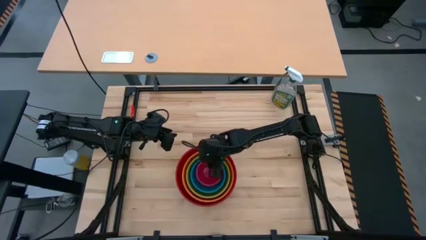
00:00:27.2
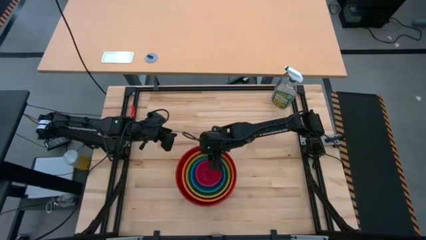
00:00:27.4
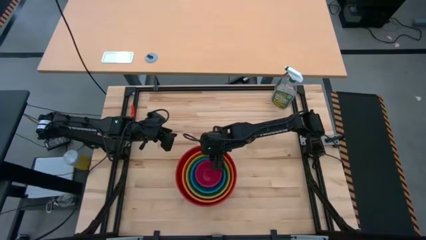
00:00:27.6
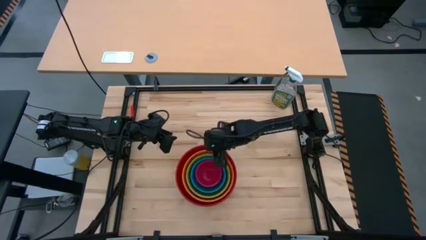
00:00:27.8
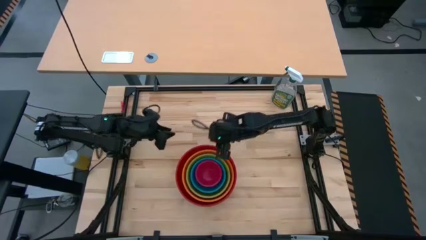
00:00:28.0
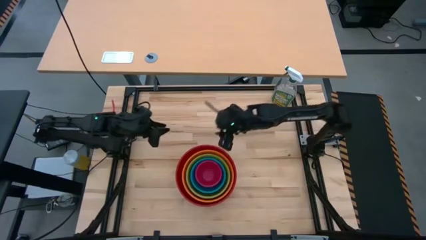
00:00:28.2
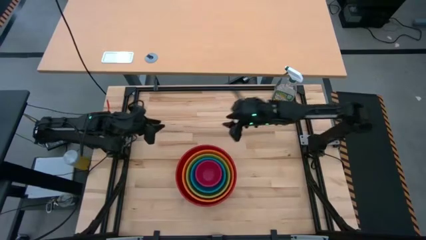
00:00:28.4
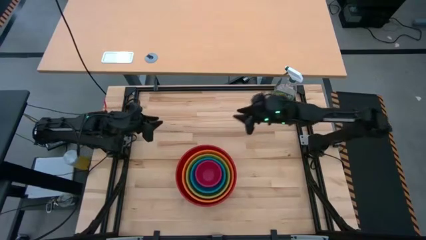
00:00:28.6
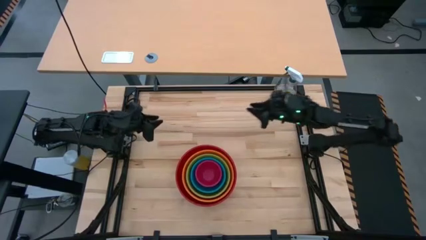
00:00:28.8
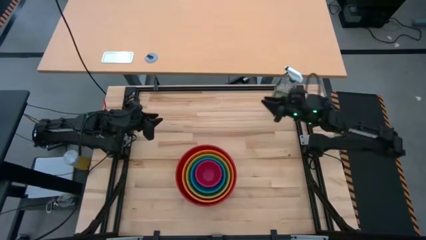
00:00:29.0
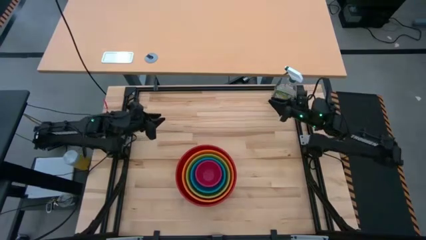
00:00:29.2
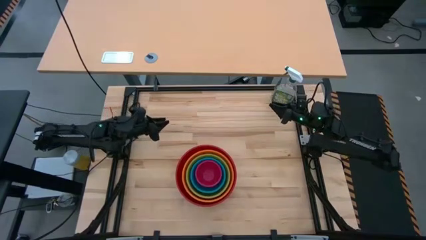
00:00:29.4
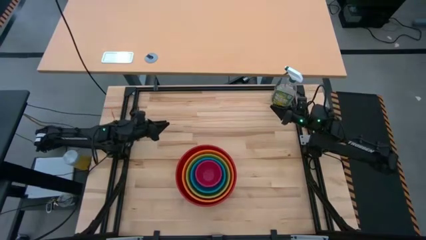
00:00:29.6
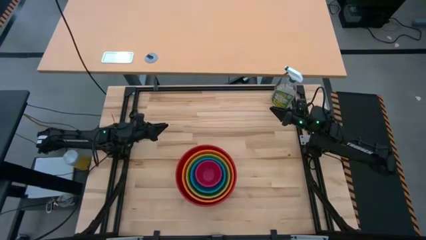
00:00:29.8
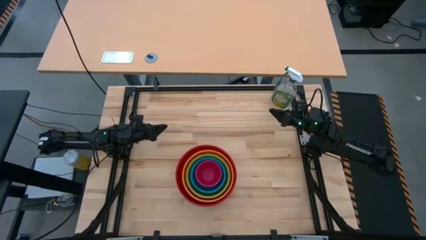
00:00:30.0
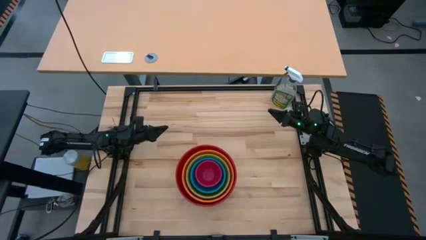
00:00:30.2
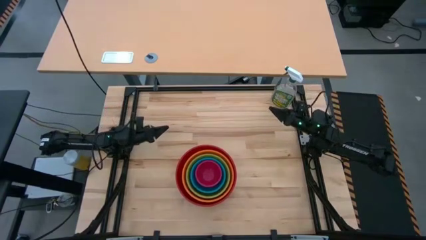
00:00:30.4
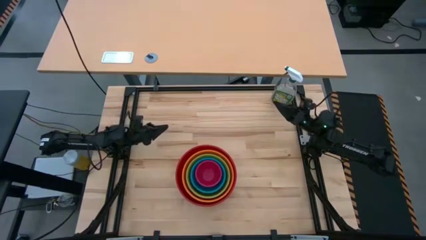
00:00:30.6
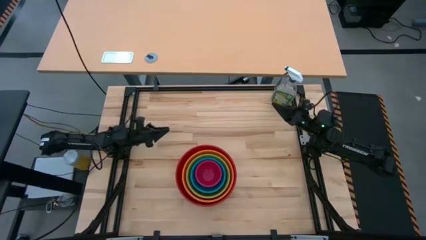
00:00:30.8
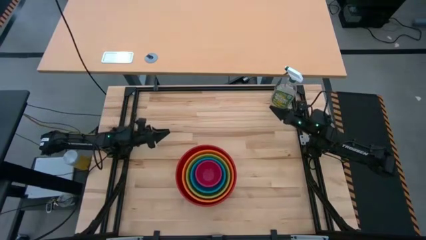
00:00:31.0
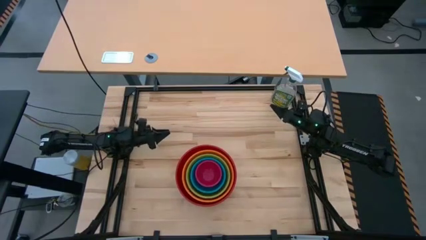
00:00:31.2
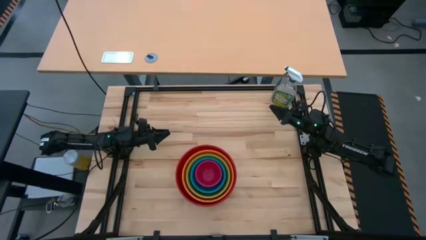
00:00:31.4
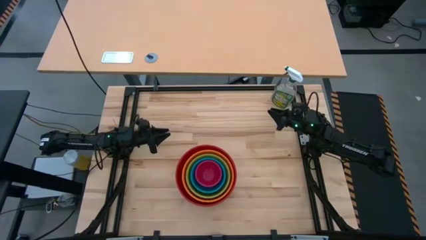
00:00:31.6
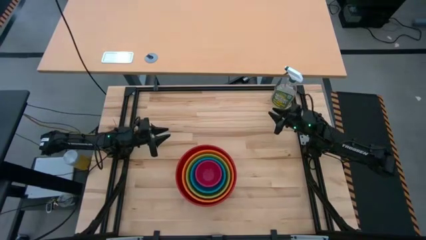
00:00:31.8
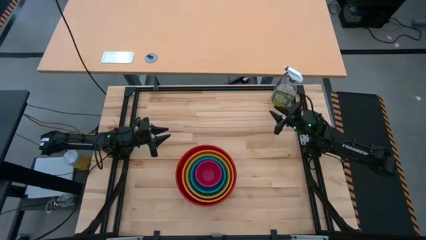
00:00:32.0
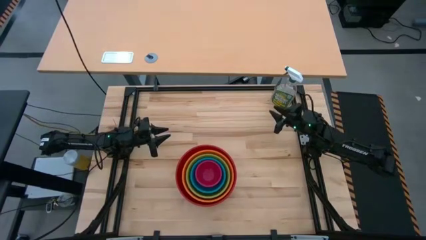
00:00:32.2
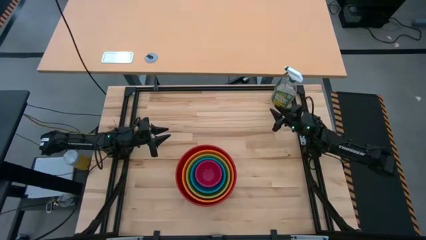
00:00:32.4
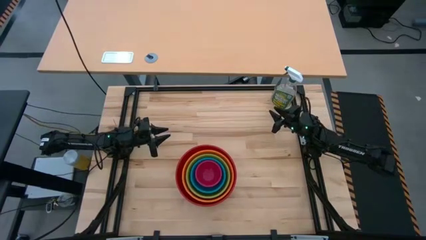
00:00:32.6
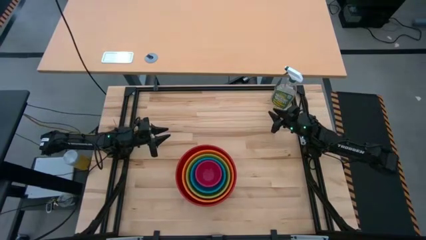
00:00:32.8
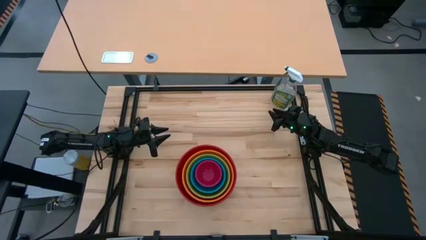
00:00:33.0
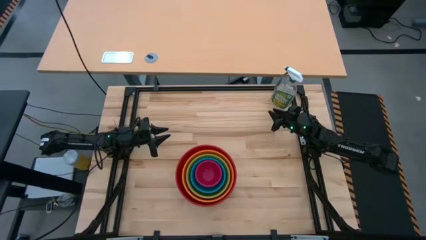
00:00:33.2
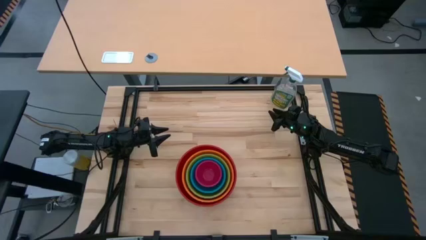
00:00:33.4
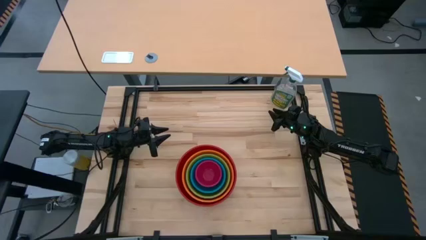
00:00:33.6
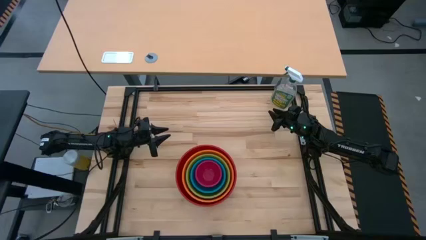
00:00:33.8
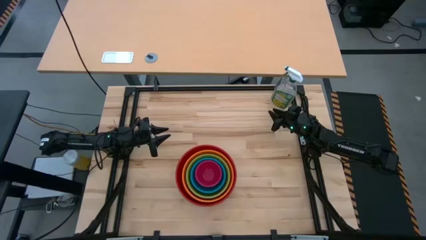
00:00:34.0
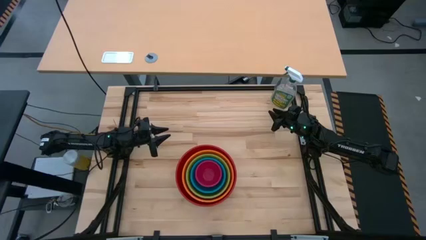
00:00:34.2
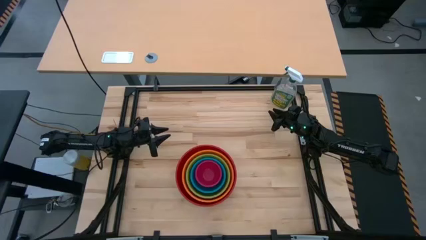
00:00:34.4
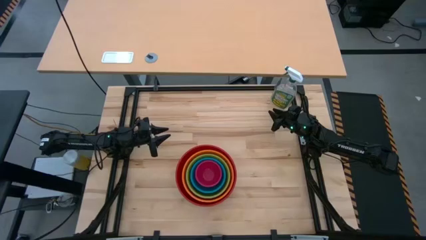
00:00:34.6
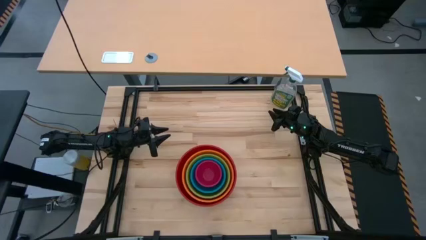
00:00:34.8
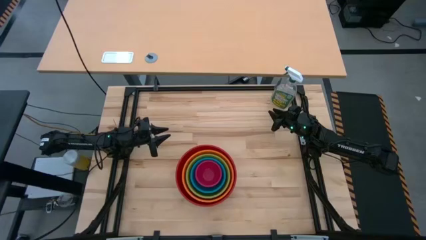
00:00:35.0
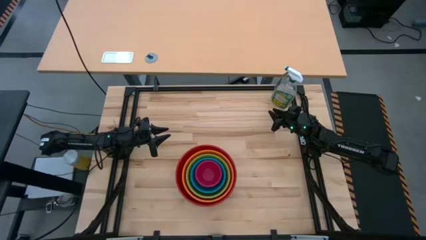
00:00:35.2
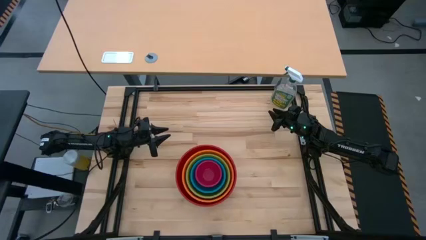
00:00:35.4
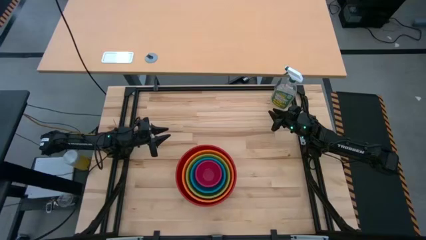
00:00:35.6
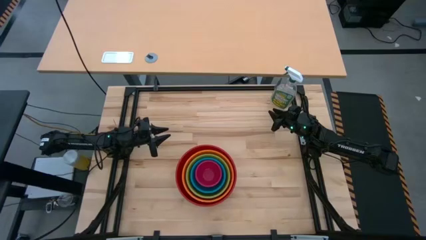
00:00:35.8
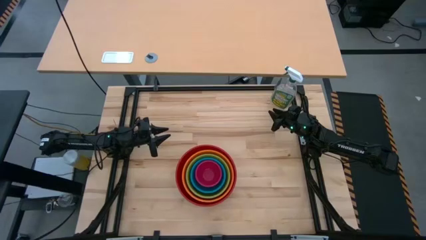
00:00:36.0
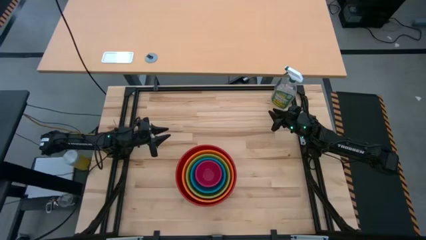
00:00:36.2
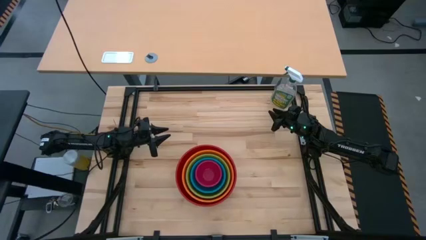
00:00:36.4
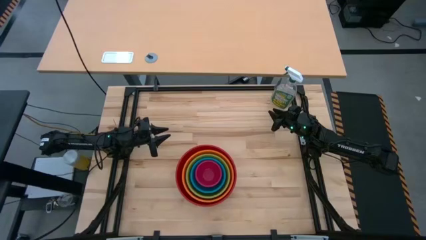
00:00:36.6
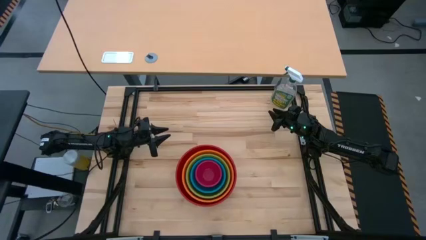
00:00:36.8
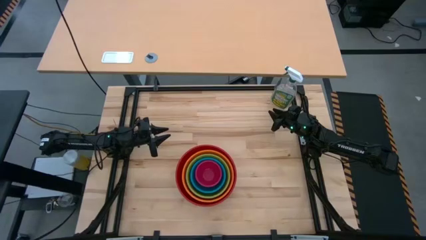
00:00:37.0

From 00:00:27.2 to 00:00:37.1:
Return to Home Position

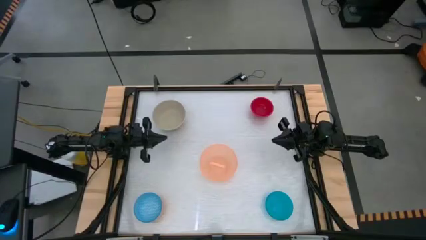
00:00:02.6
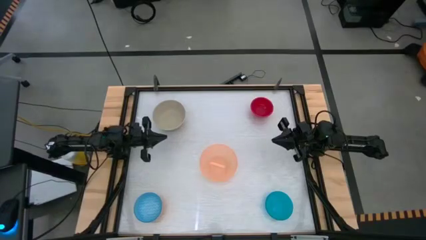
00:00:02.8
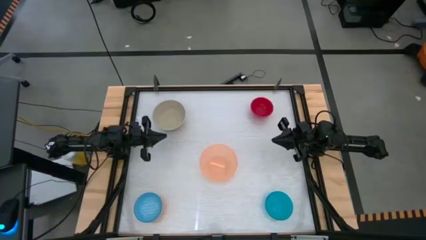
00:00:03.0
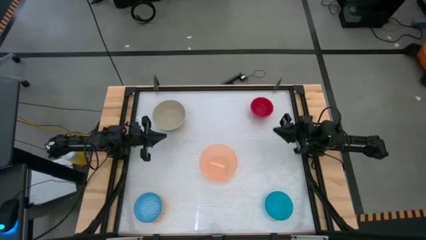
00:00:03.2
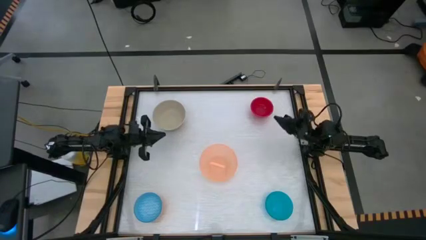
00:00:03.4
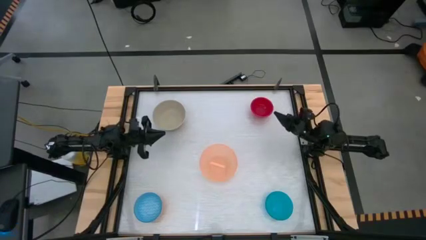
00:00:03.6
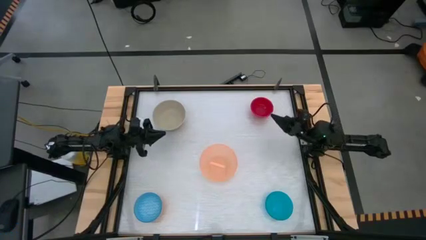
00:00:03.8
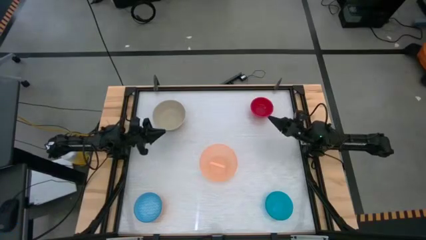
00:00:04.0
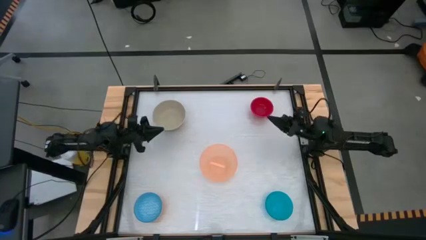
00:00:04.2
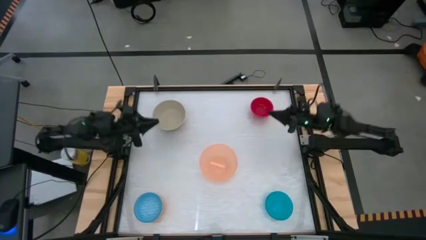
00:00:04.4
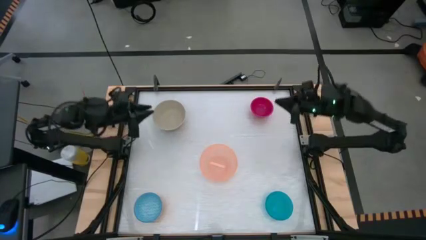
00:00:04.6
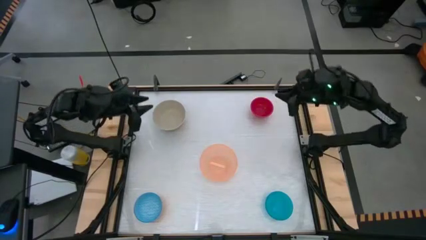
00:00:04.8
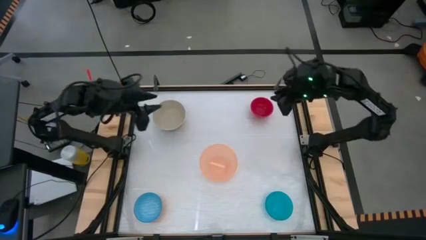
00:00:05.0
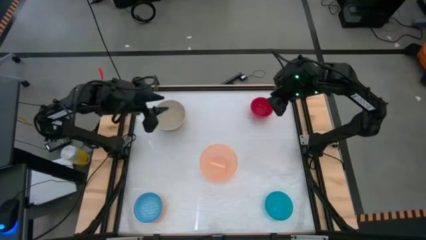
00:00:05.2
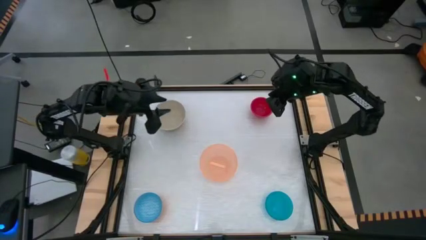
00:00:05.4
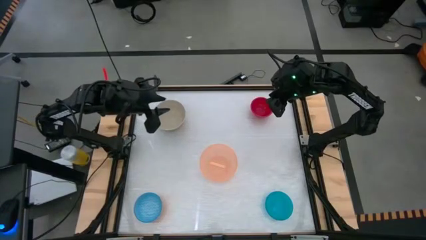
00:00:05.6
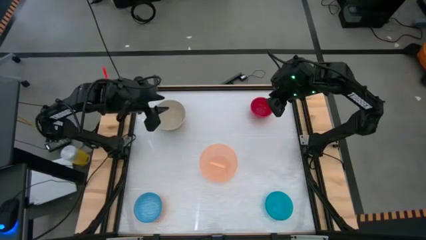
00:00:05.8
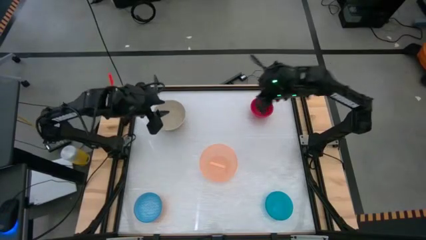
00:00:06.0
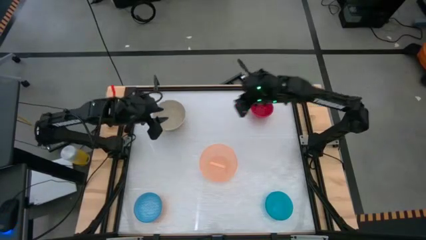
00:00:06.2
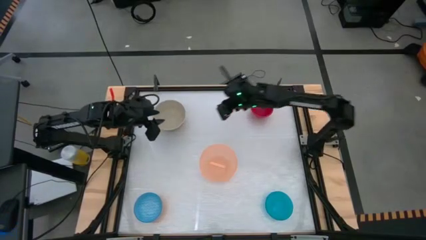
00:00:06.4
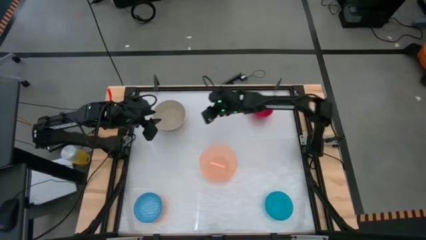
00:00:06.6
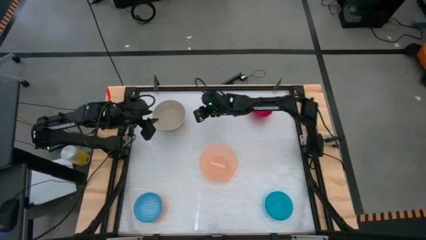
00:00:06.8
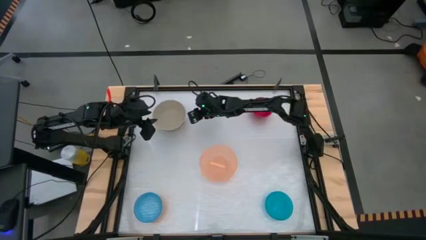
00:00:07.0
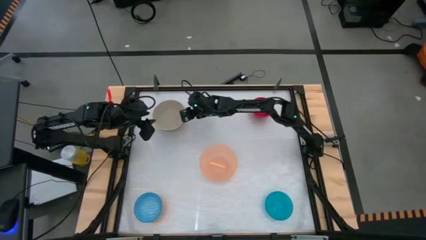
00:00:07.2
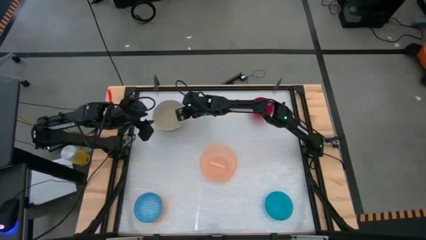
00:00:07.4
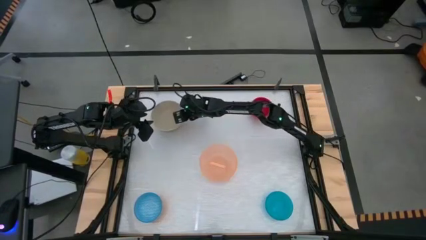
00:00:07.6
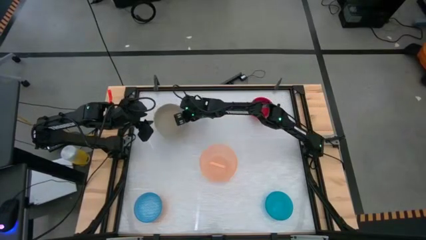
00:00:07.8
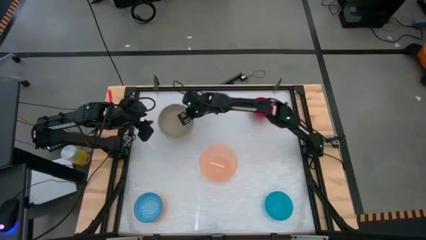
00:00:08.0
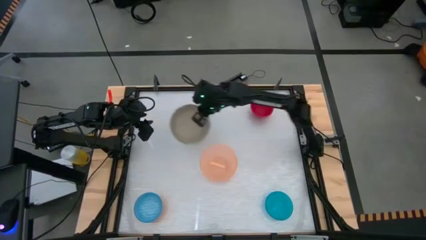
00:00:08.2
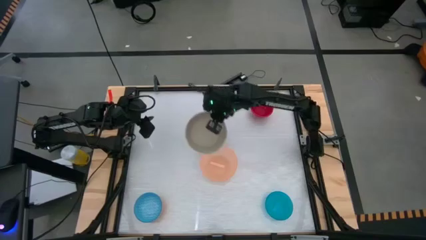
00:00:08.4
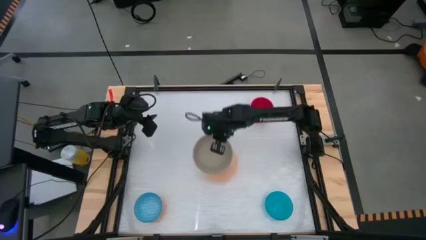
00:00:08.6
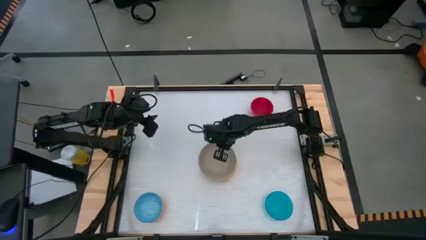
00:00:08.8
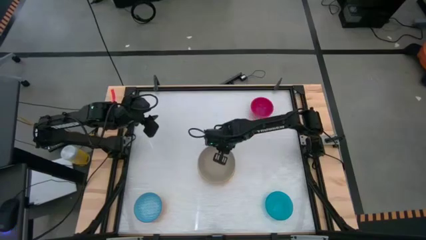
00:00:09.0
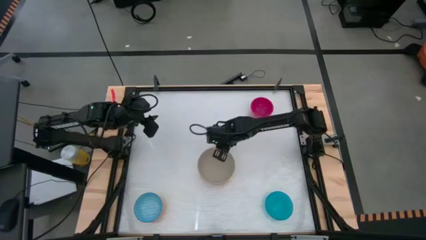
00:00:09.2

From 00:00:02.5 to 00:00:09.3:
Stack the gray bowl on top of the orange bowl
